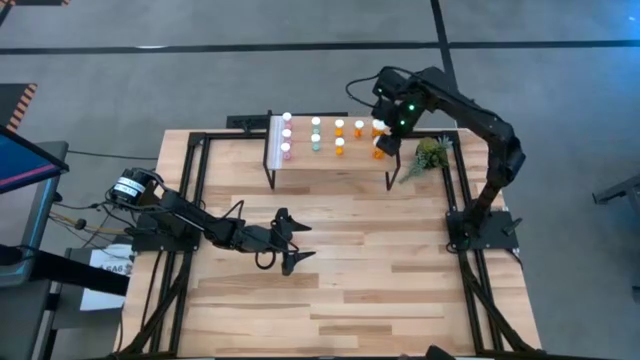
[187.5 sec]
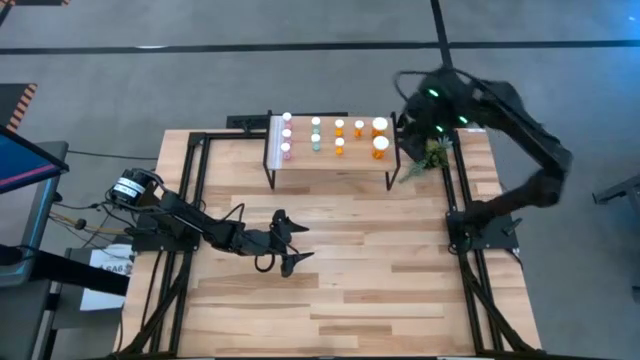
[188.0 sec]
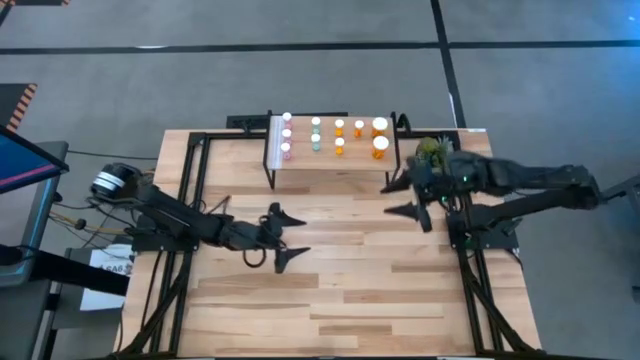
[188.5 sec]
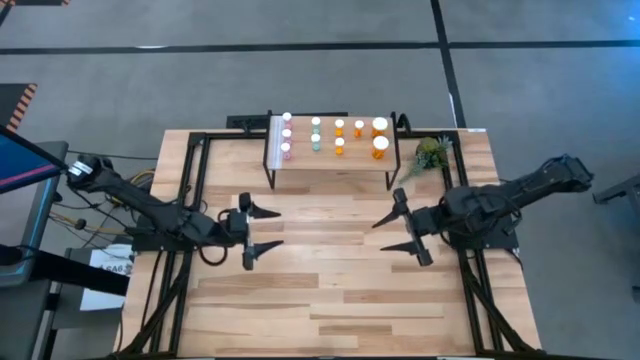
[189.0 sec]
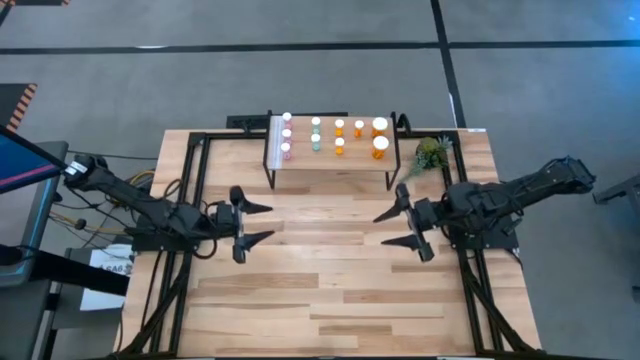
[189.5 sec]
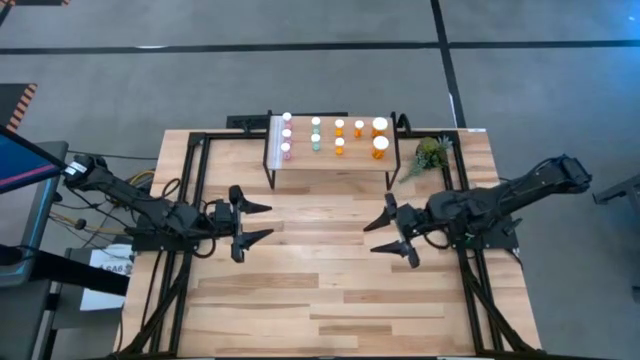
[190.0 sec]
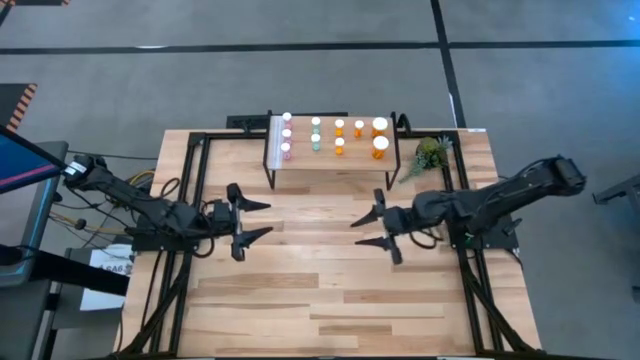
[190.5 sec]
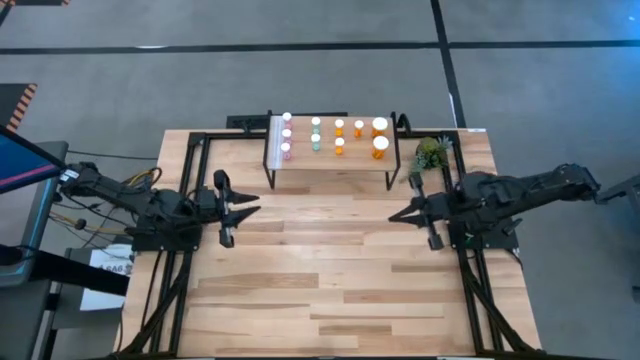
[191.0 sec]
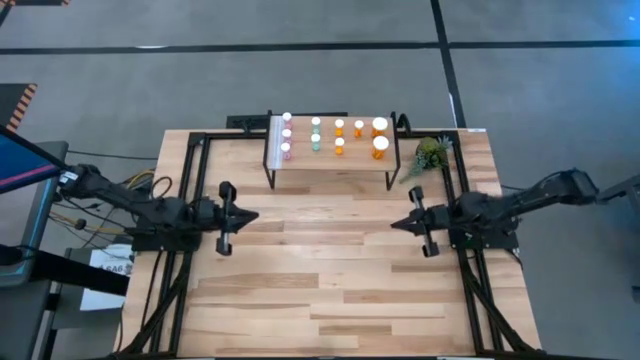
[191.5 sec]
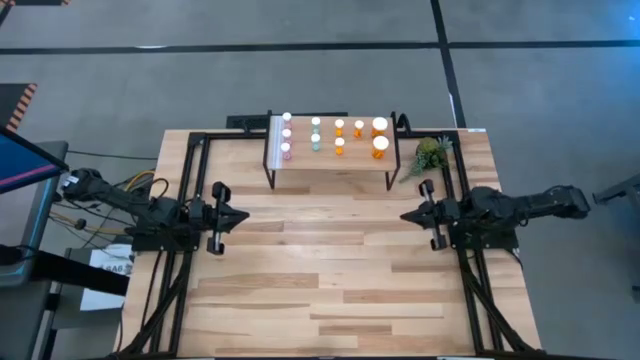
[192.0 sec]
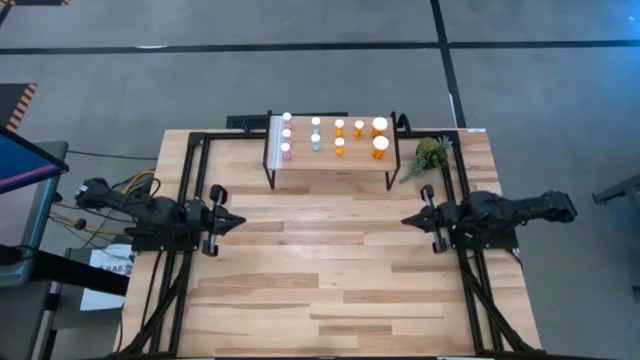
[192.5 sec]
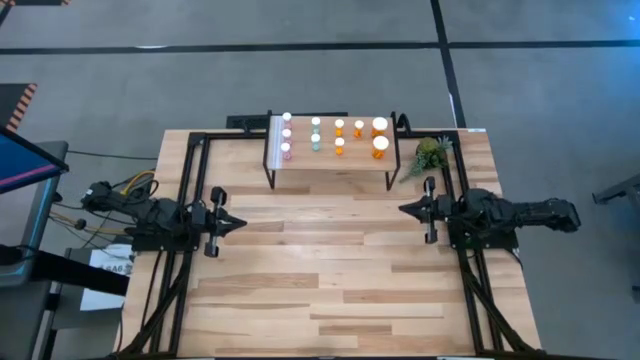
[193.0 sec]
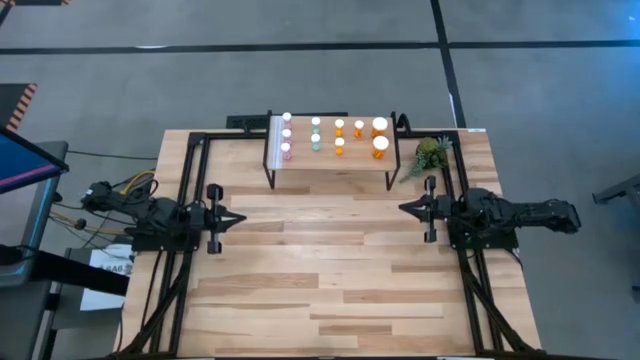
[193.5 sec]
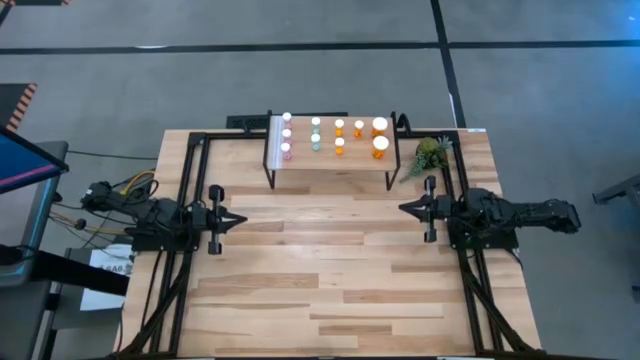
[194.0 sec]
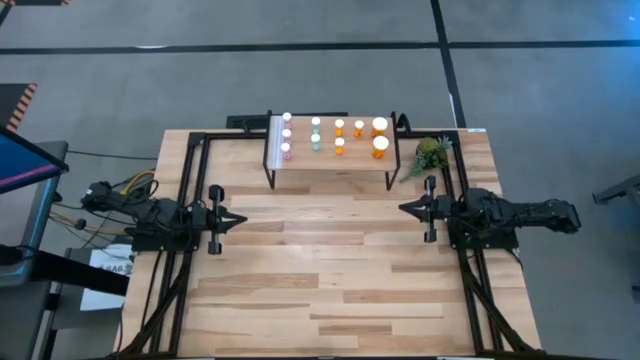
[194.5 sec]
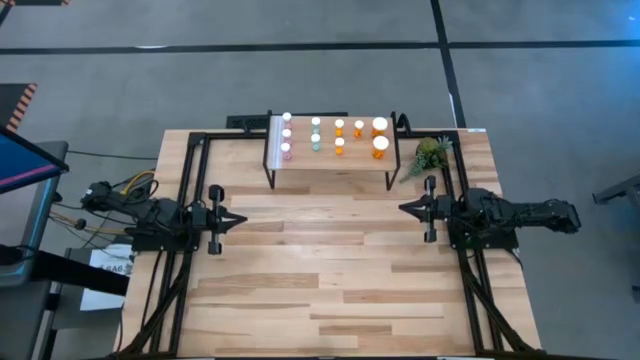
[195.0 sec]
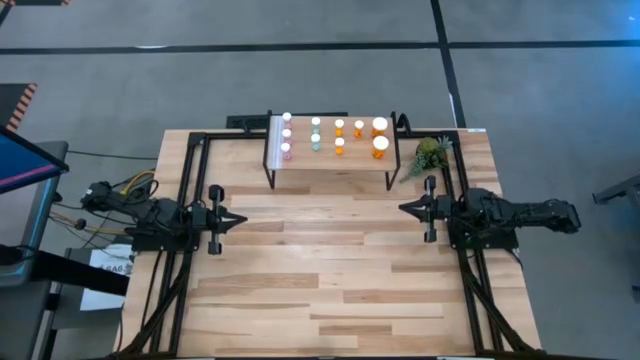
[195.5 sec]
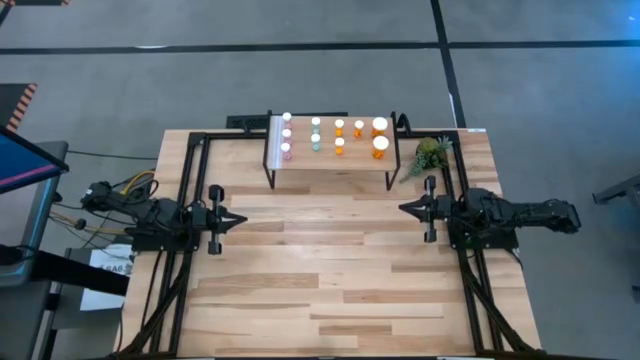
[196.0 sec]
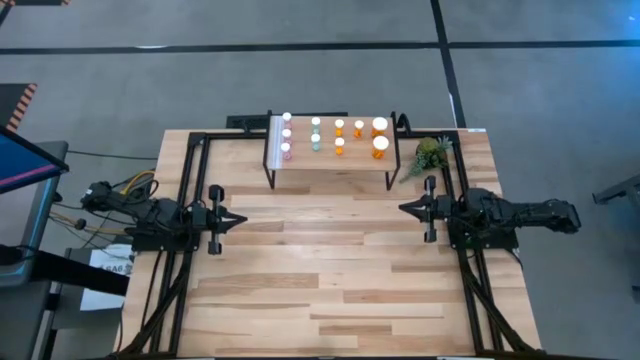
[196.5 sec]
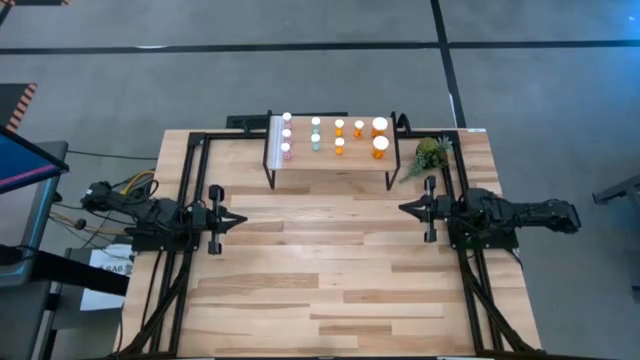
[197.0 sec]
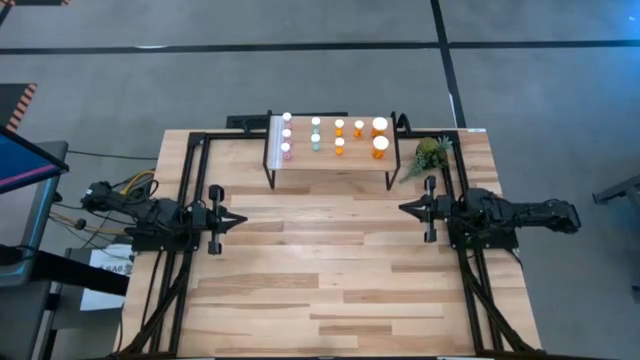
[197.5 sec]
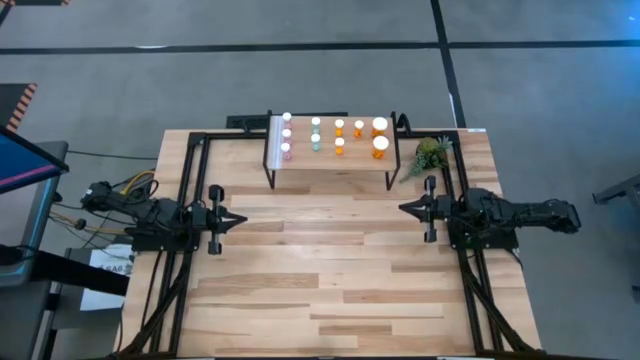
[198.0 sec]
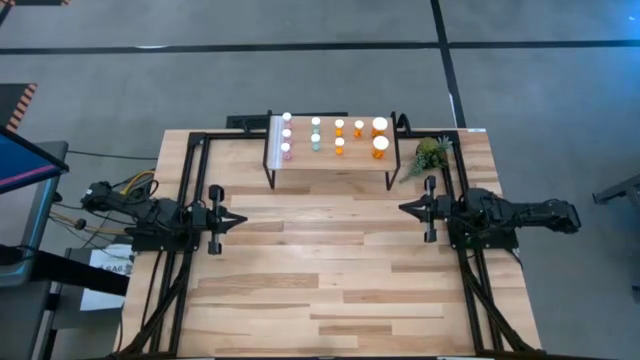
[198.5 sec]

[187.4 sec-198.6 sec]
Task: Pick and place medicine bottles onto shelf by color
Return to Home Position

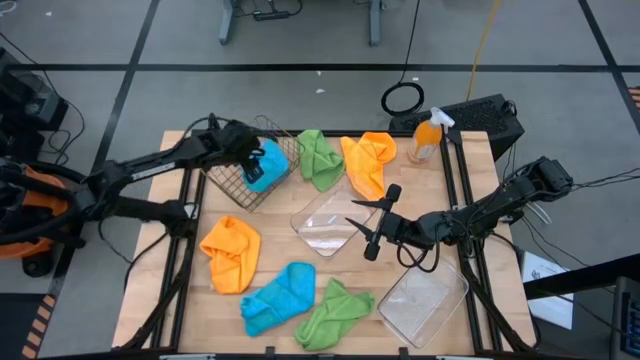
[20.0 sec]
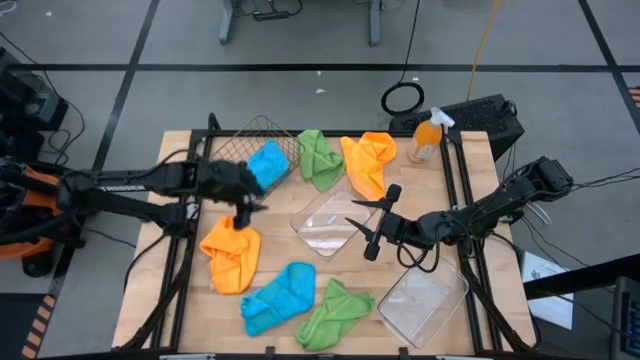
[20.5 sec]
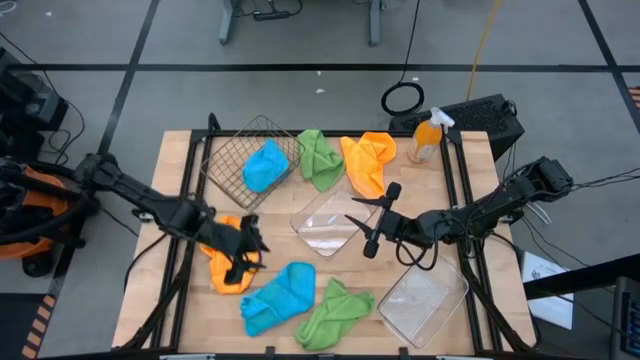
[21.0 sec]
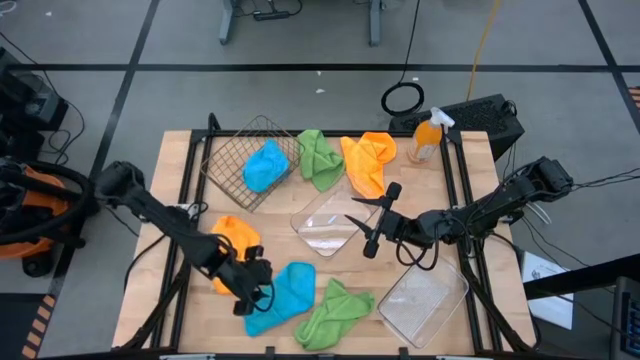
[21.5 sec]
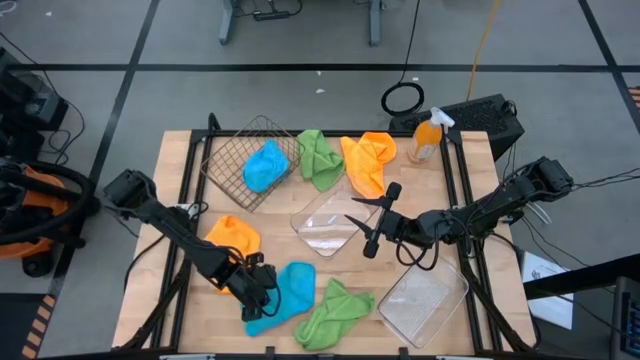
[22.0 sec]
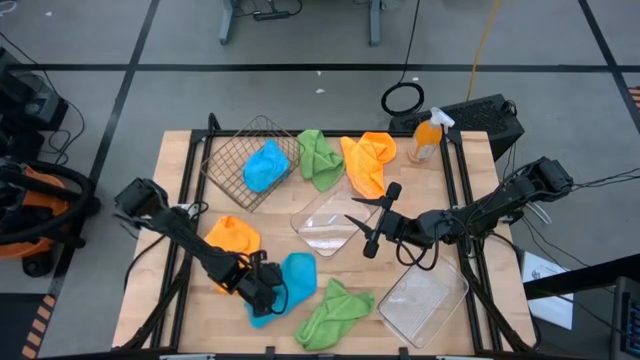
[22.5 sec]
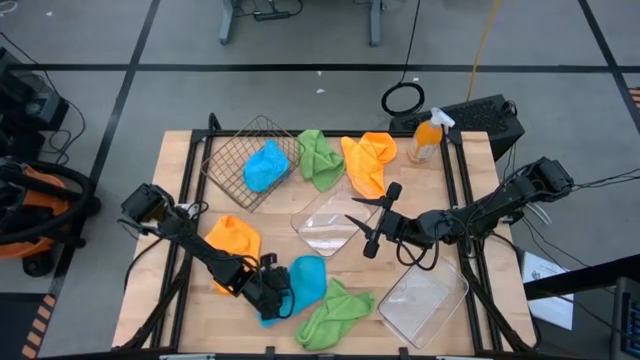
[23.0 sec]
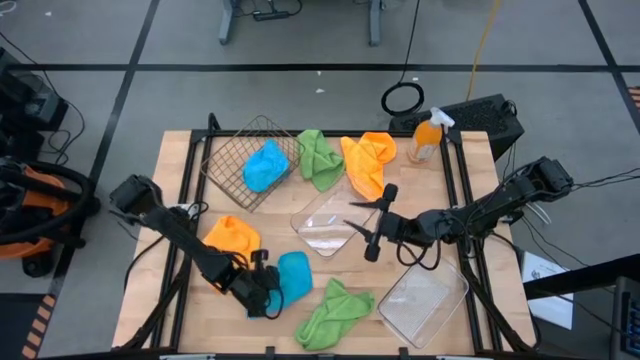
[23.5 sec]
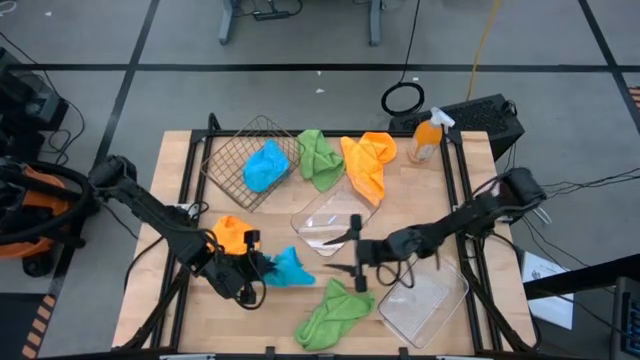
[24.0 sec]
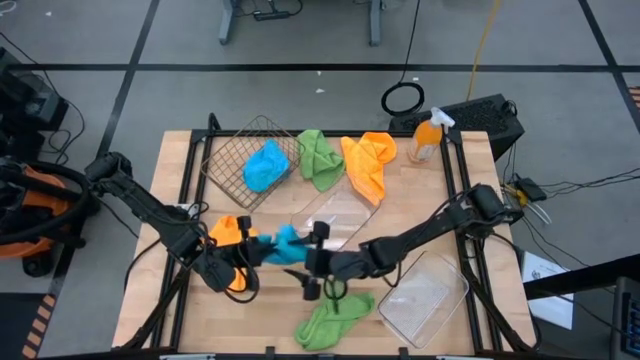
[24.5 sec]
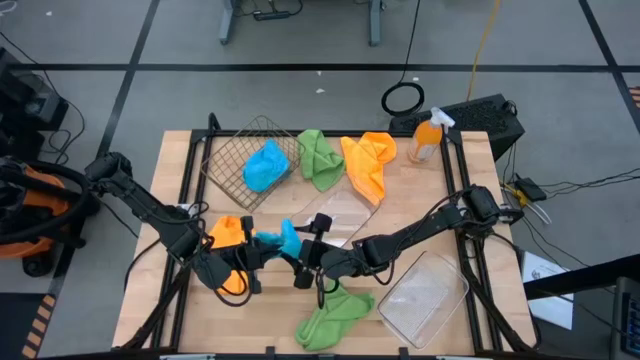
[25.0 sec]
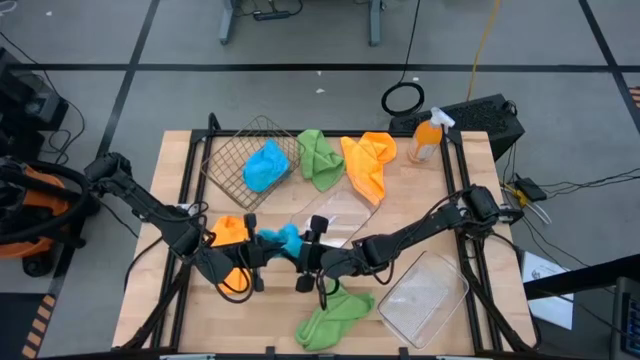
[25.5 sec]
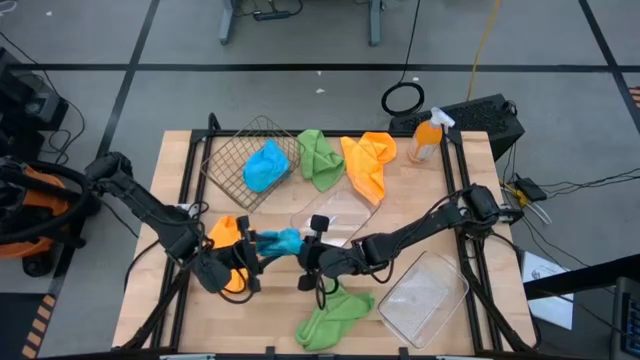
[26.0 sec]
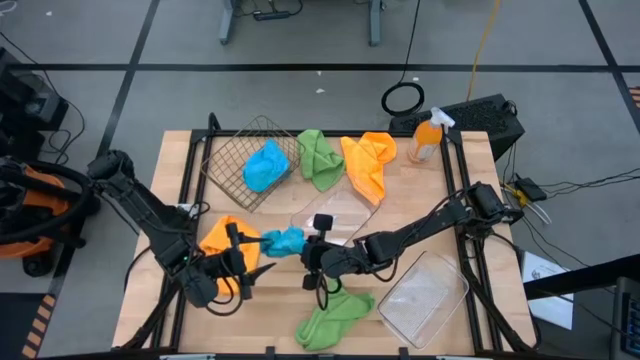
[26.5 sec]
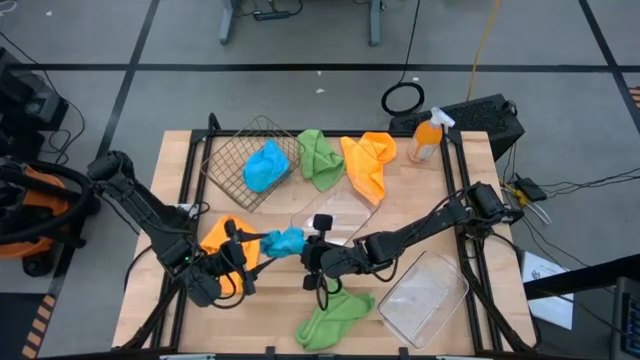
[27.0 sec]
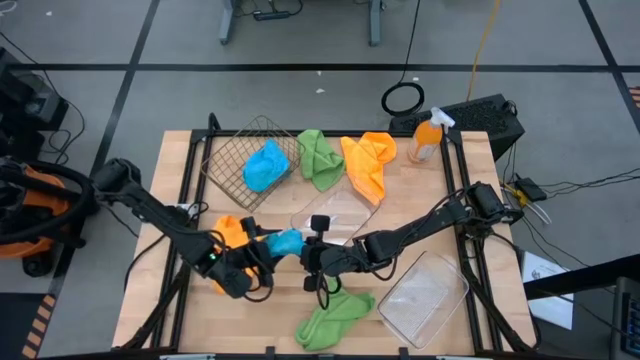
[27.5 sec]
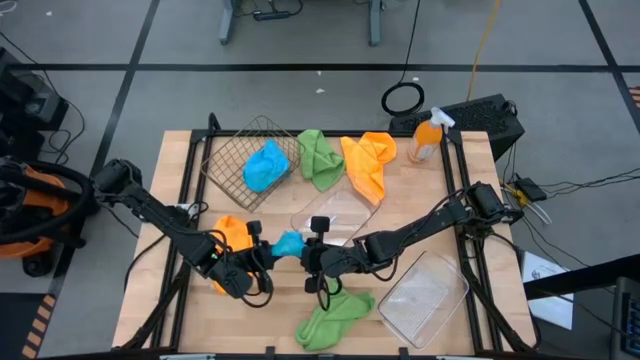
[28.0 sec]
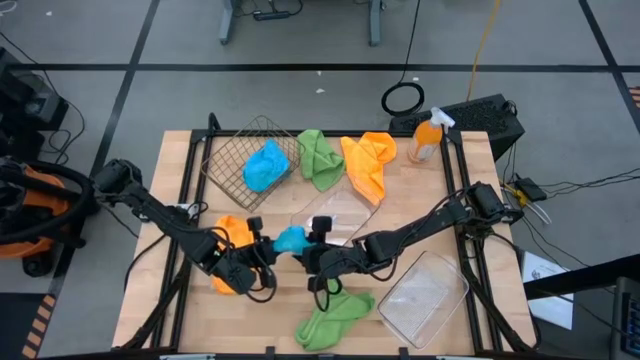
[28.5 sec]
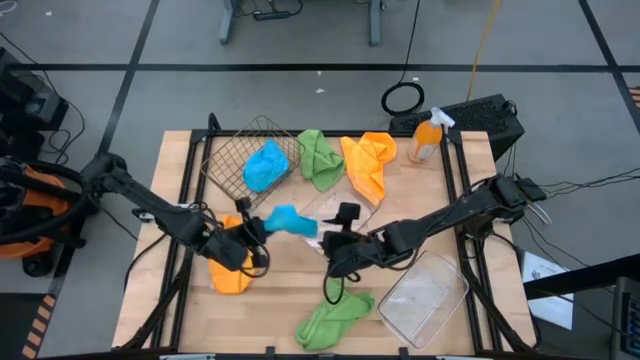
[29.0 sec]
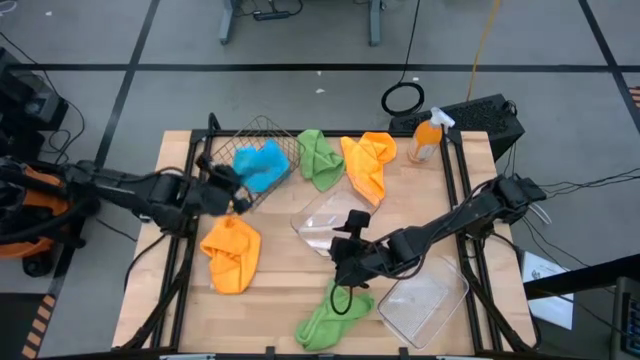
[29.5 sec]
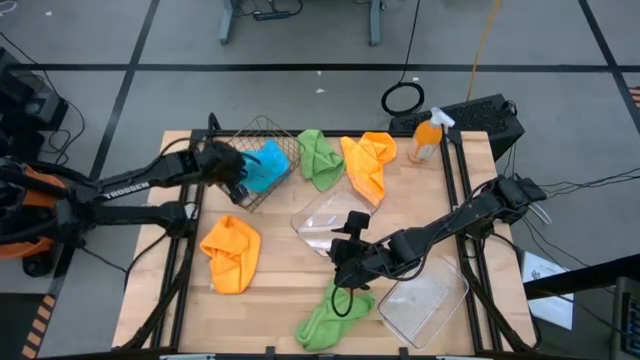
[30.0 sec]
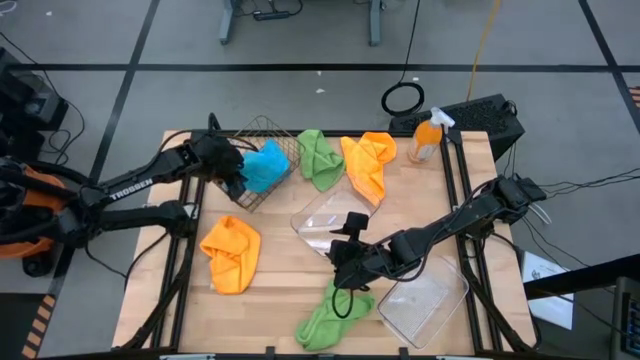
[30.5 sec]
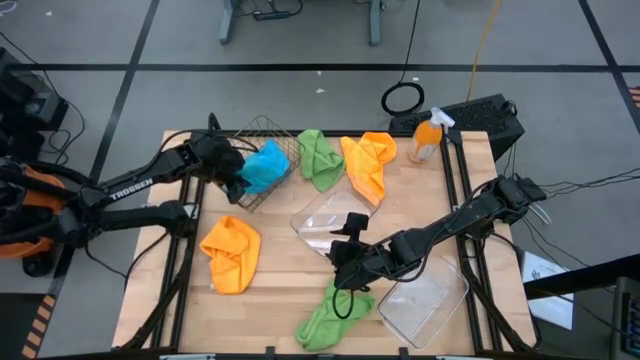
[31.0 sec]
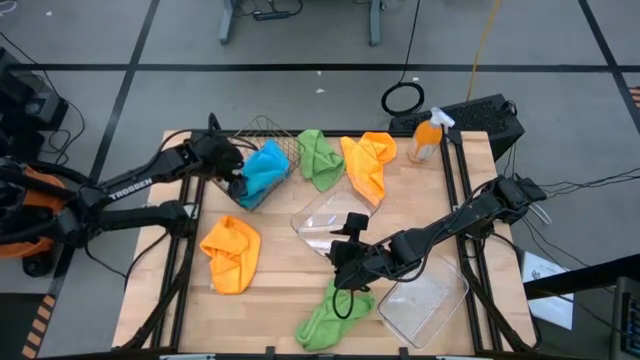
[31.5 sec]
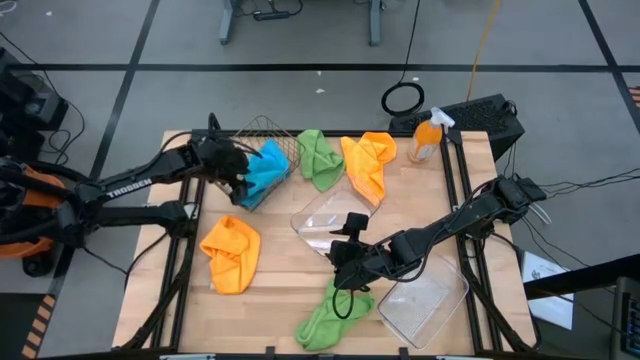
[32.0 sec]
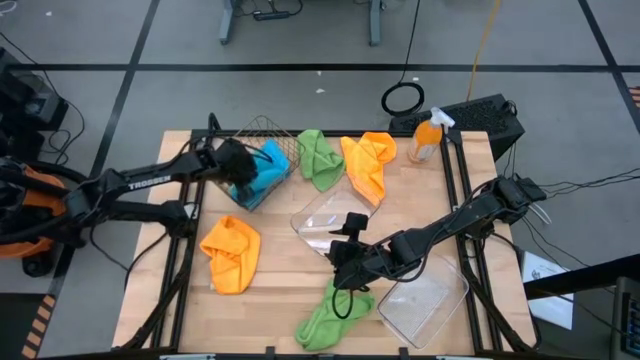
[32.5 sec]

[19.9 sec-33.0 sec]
Task: Sort microfiber towel by color & place in baskets
Put the blue towel into the gold wire basket
